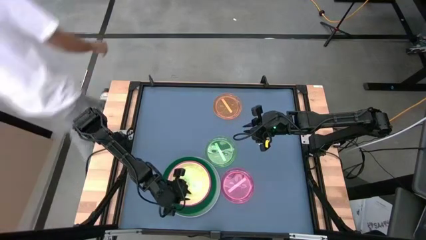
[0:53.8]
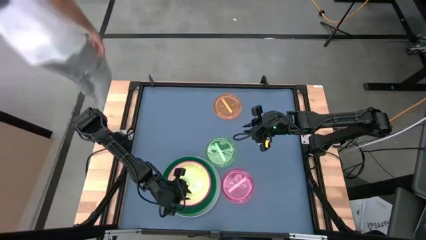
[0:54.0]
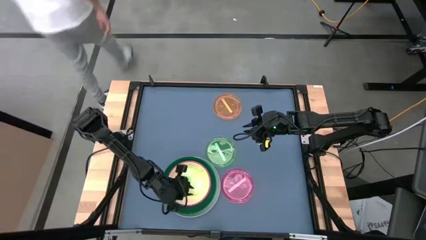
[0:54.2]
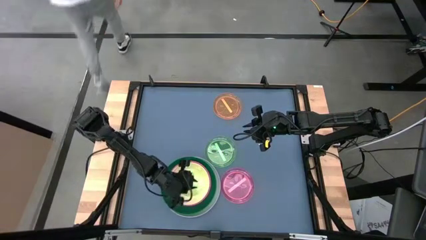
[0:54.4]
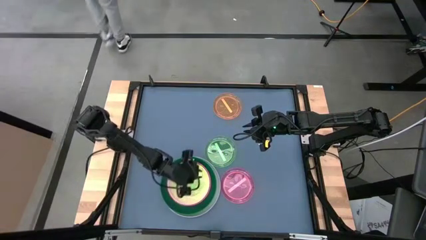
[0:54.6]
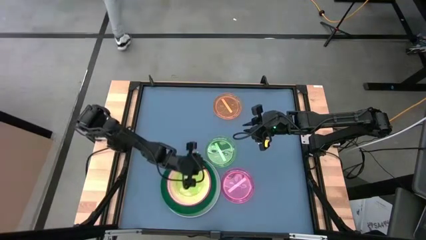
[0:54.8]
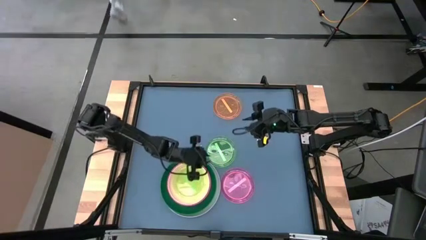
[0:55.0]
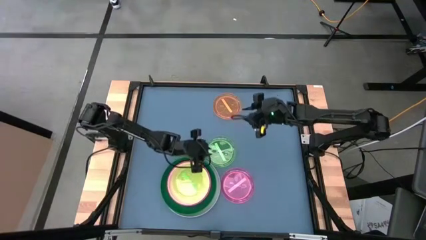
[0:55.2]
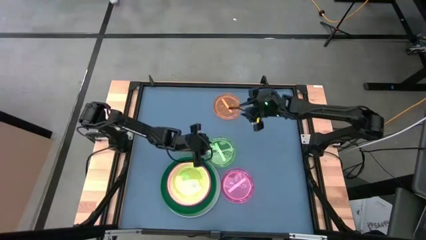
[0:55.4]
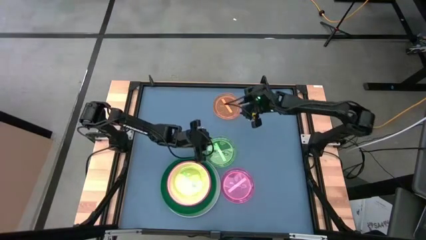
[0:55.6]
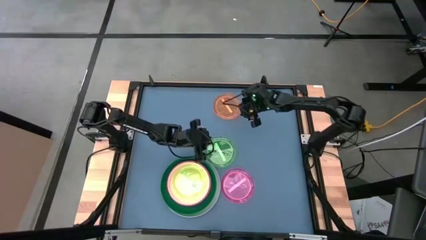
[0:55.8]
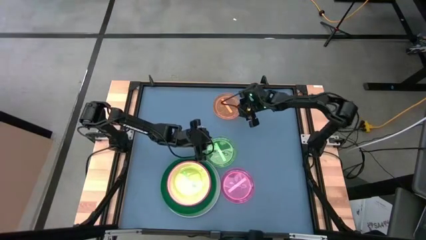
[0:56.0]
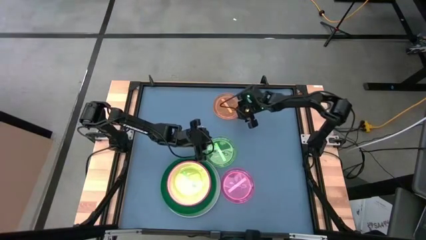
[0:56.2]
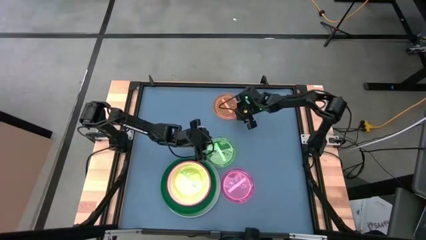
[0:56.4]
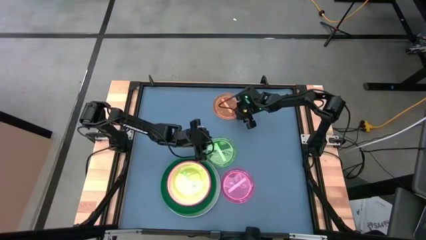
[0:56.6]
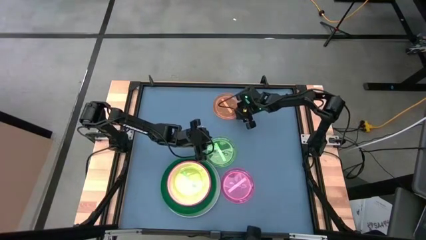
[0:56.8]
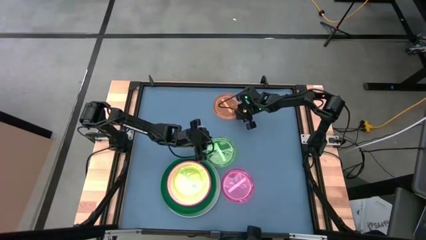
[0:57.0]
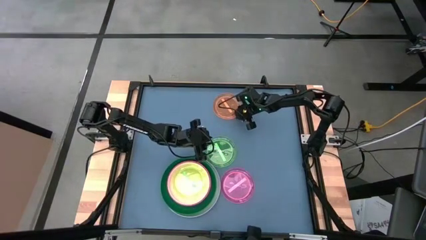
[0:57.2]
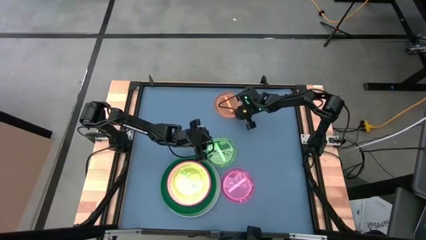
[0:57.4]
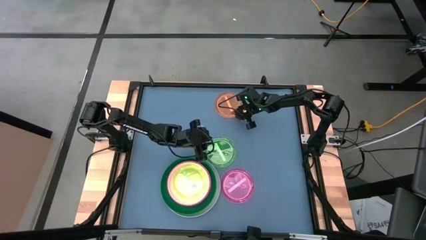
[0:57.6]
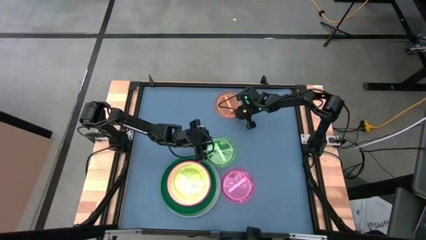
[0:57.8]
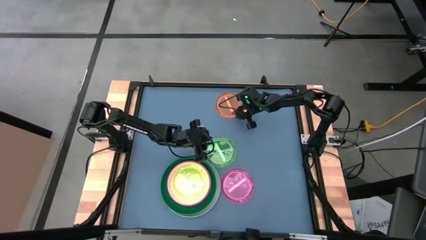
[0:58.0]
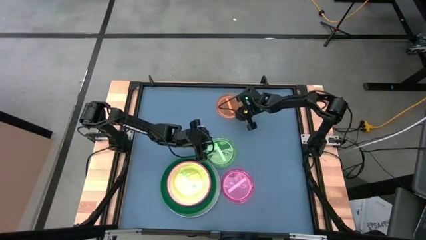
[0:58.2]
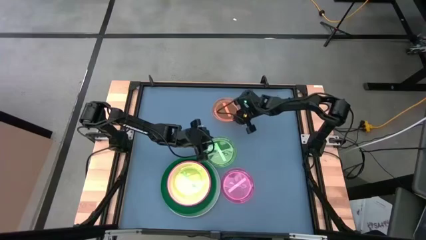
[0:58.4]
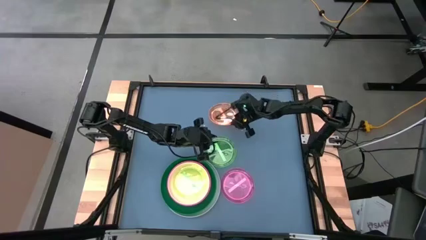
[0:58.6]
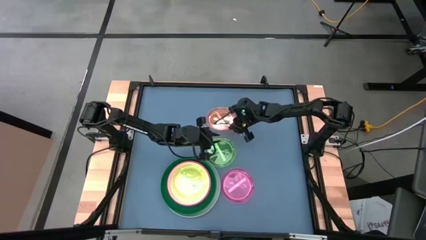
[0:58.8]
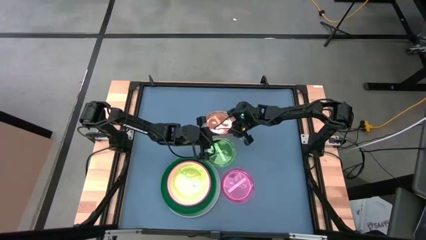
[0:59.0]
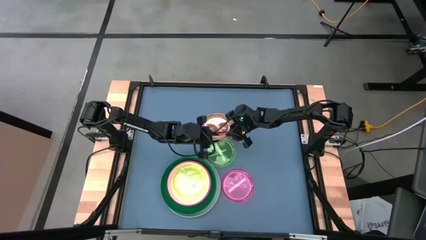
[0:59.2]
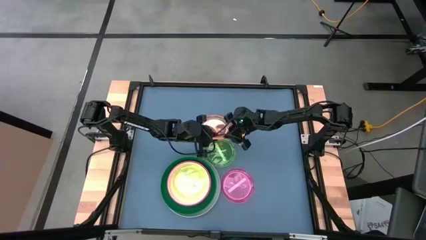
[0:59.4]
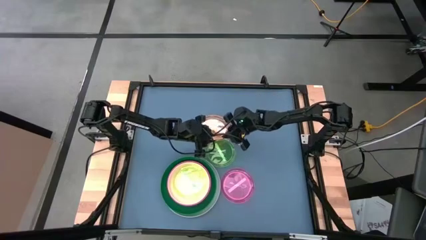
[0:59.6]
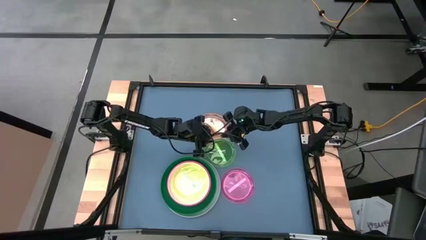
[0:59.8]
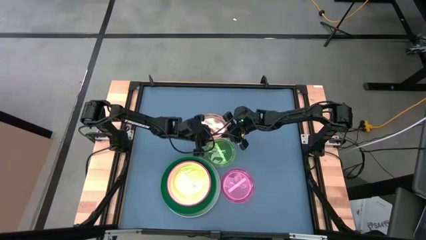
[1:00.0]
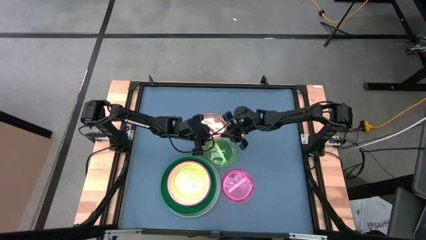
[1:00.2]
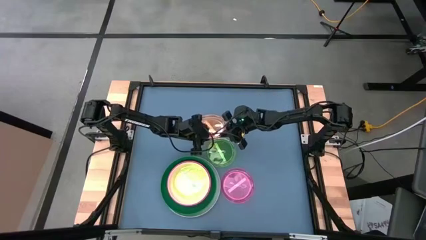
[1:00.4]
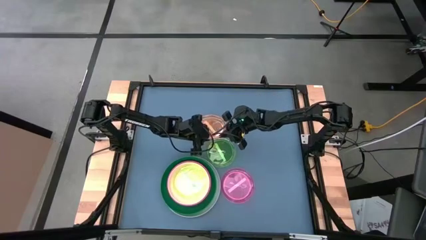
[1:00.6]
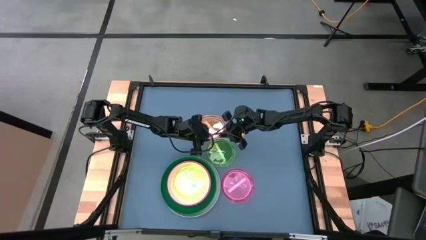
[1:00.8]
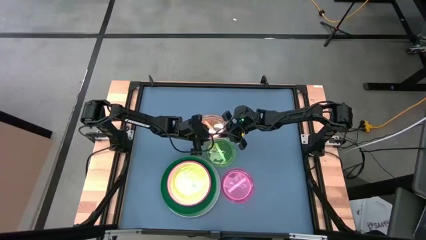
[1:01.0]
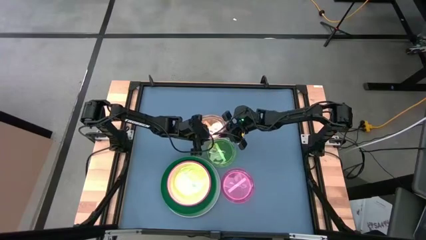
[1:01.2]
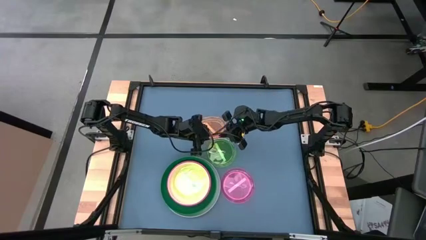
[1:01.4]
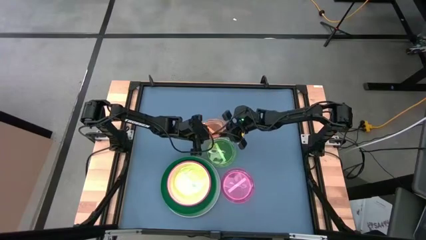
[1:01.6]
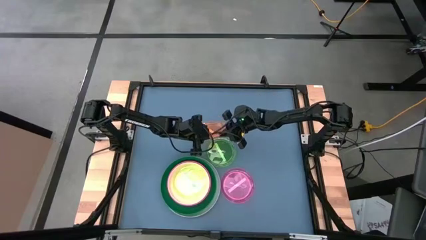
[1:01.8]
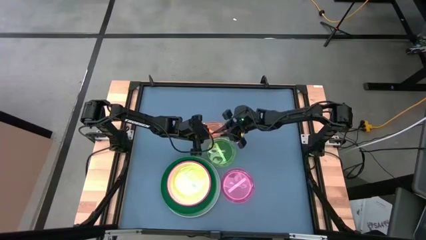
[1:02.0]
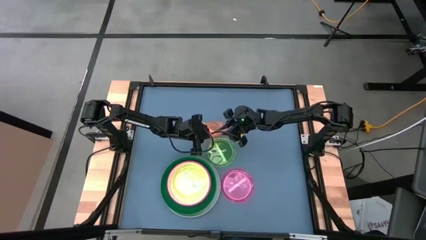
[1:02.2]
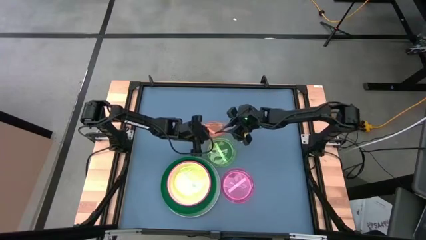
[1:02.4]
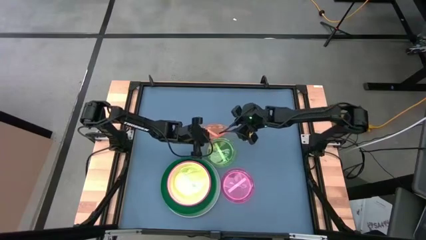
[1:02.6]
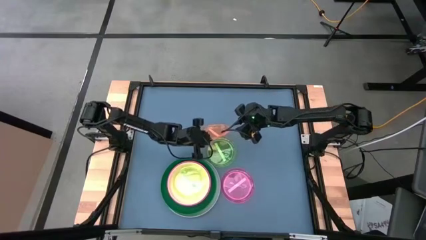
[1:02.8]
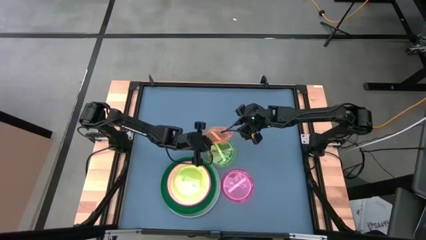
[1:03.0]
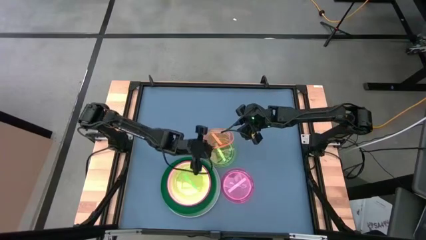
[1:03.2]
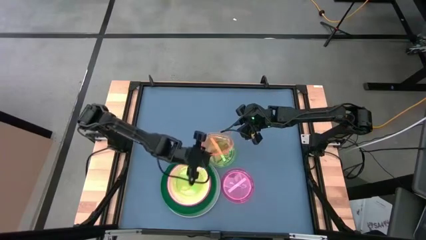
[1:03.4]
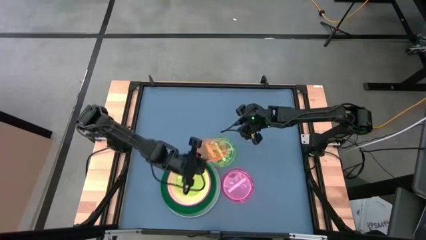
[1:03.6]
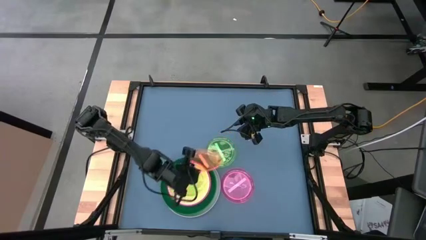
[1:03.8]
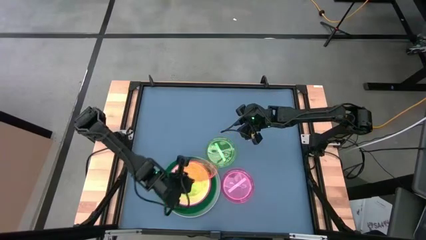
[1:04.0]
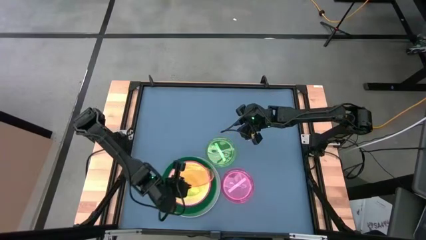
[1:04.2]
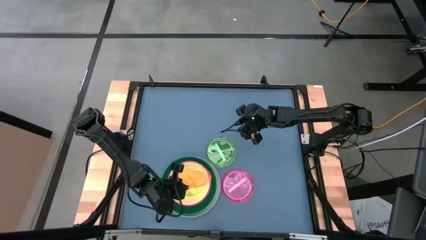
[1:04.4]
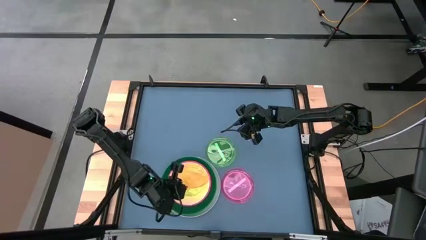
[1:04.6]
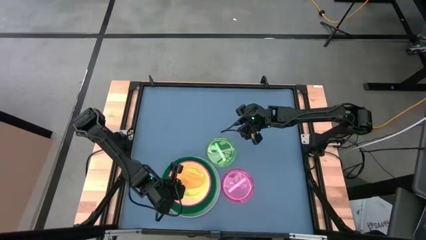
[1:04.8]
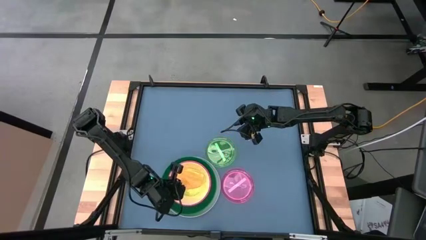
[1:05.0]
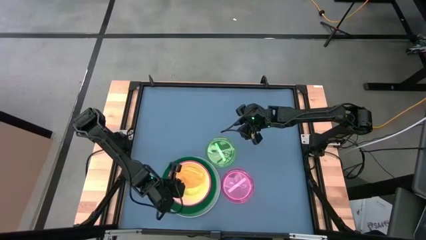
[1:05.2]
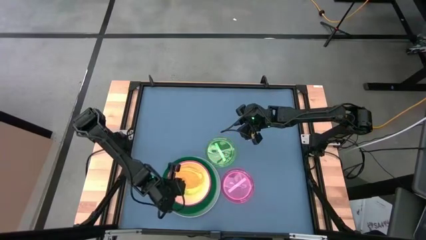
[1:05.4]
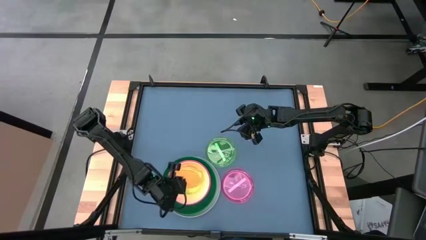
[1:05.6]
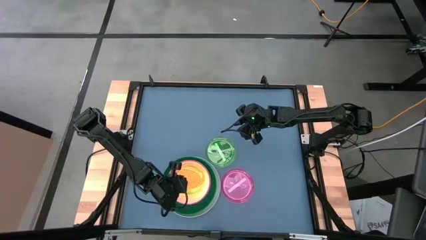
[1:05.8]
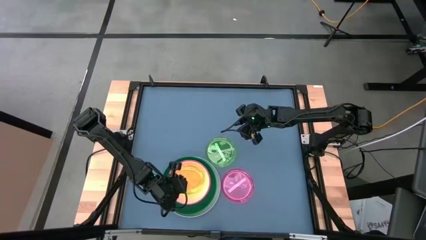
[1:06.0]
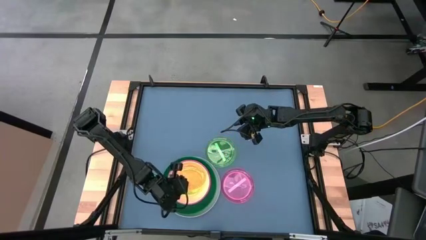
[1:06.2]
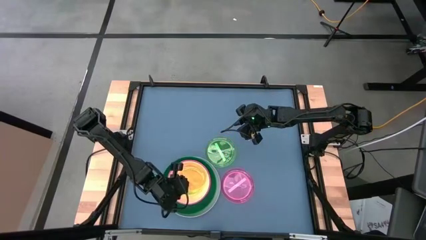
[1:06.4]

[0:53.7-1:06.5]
Task: Stack plastic plates
Stack the orange plate on top of the light green plate

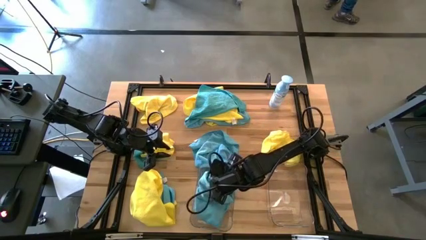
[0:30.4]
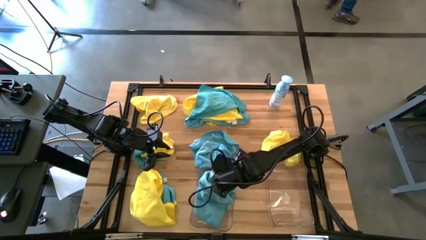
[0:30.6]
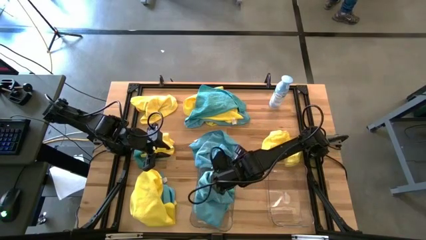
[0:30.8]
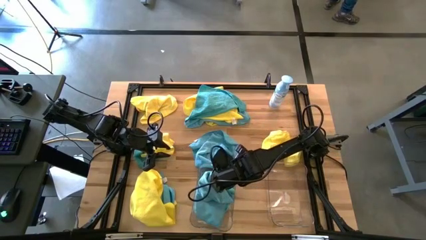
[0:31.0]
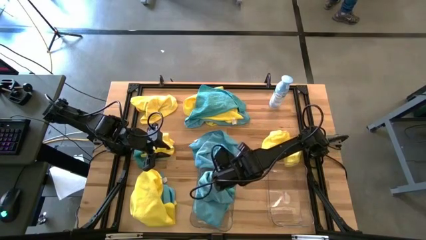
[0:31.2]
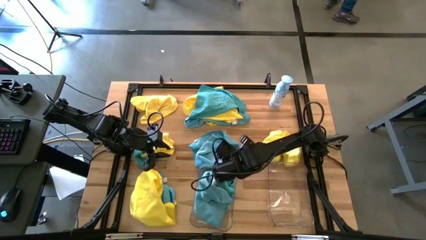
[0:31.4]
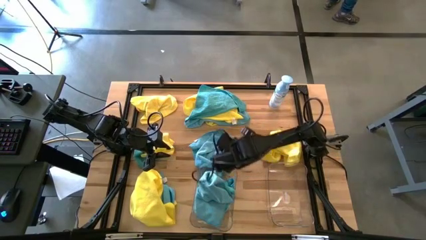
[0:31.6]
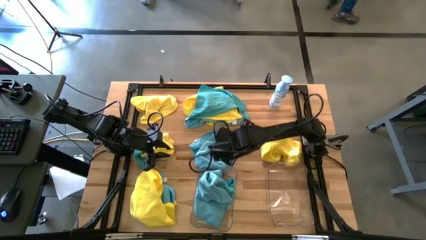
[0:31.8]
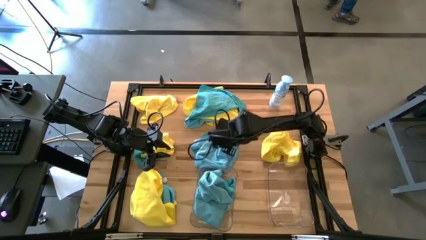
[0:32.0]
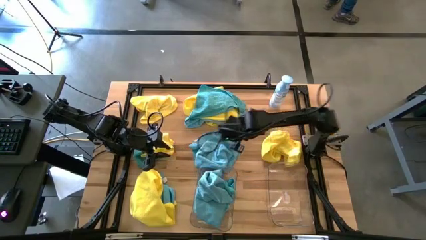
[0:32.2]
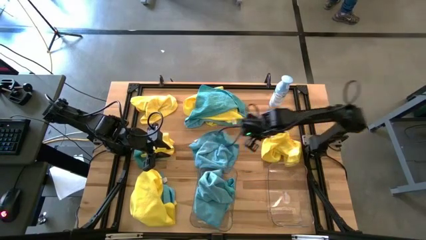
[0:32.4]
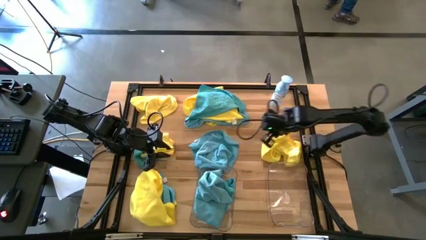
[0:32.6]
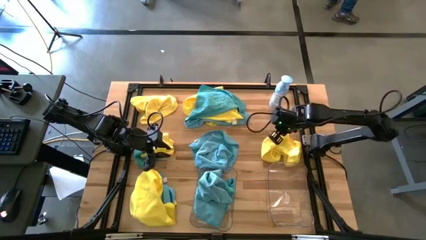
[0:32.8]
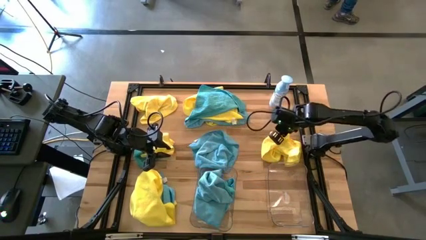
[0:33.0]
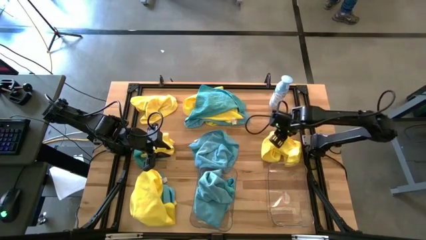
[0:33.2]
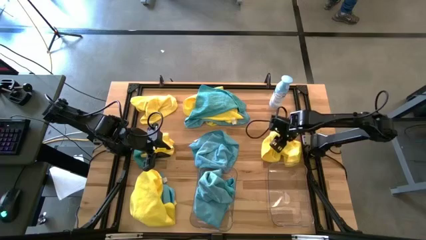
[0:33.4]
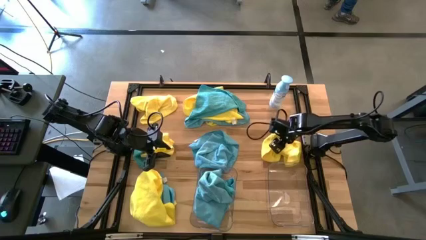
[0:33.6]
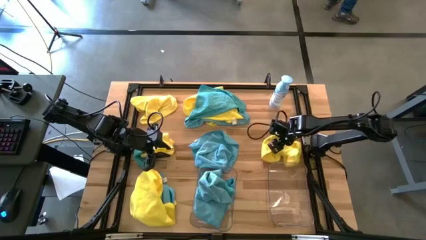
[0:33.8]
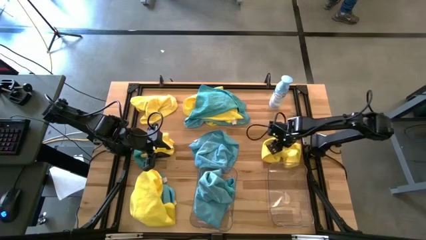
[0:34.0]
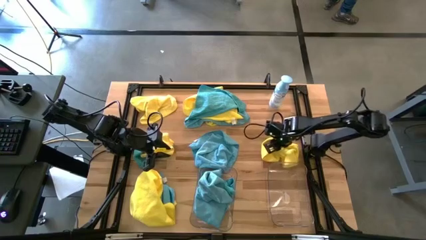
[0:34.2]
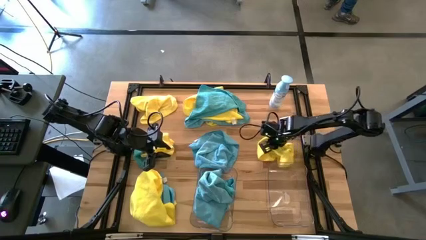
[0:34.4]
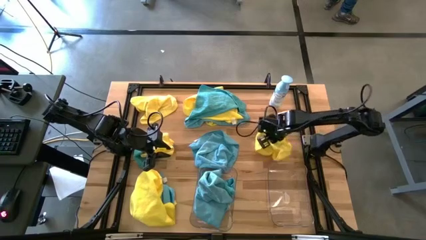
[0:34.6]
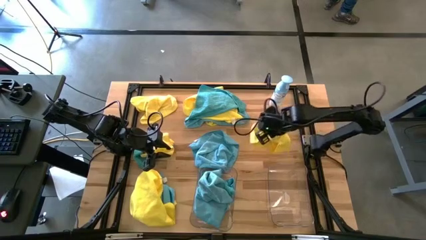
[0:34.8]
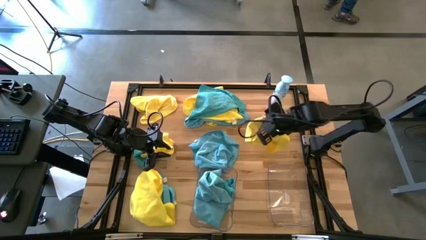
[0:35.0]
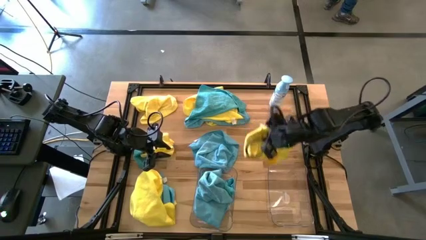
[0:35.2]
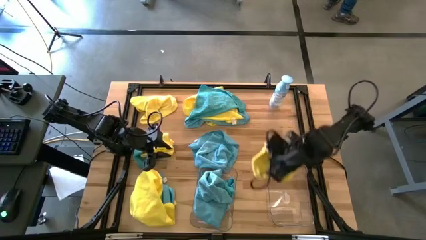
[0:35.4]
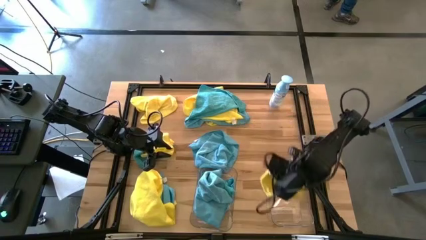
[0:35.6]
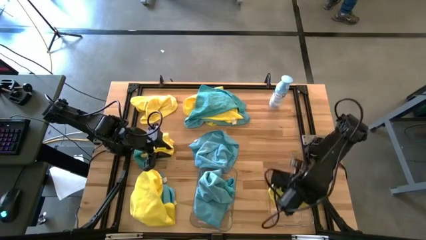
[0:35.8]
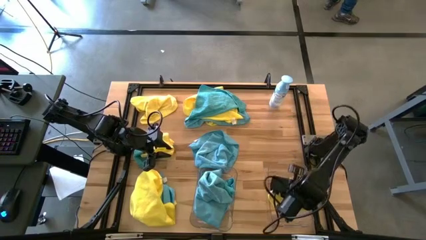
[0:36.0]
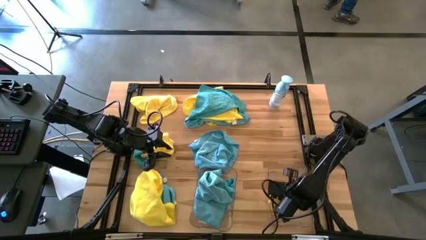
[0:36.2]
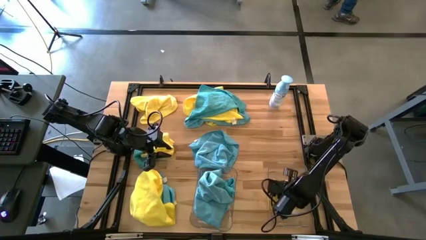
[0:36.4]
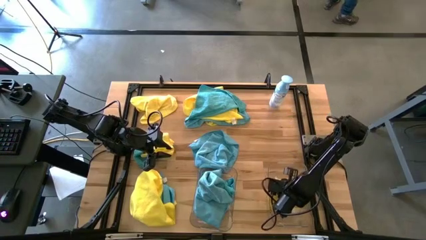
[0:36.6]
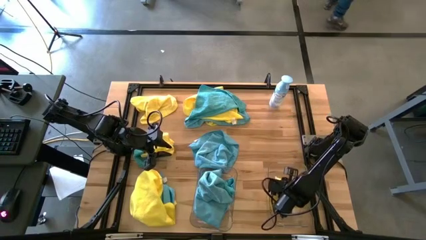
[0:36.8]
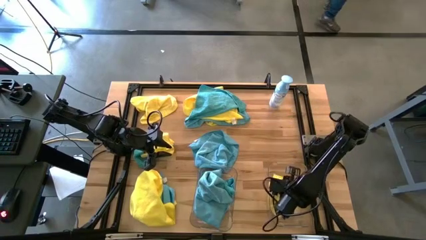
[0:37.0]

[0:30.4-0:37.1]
Task: Sort microfiber towel by color & place in baskets
Put the yellow towel into the right transparent bin
